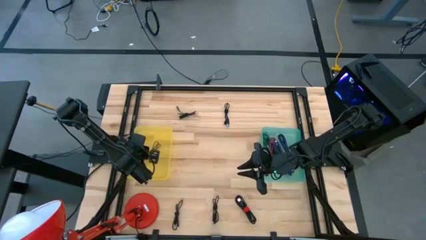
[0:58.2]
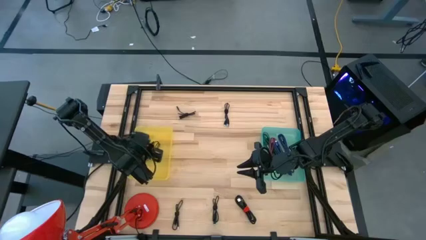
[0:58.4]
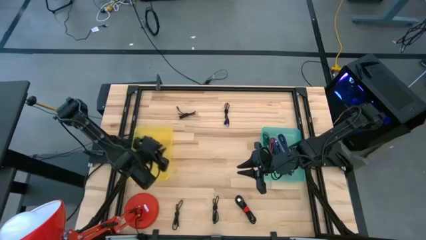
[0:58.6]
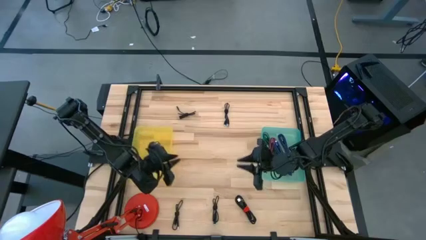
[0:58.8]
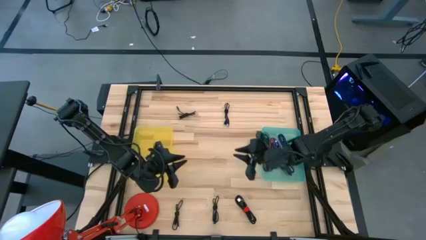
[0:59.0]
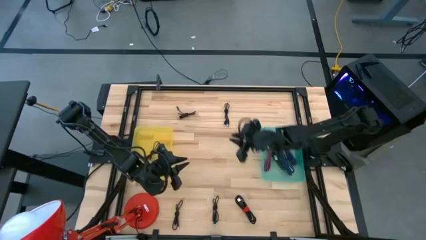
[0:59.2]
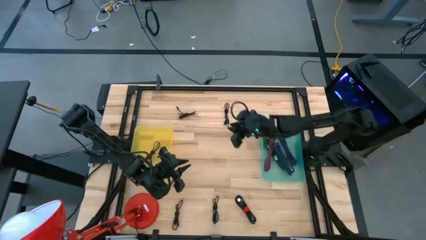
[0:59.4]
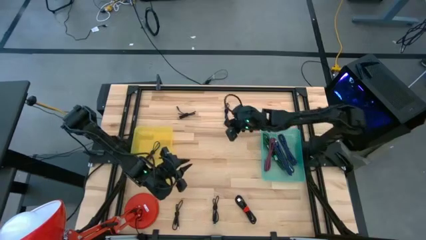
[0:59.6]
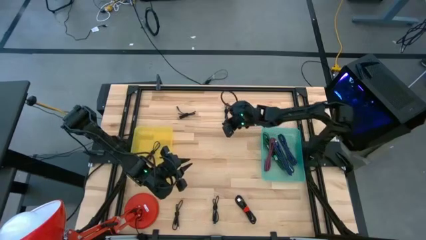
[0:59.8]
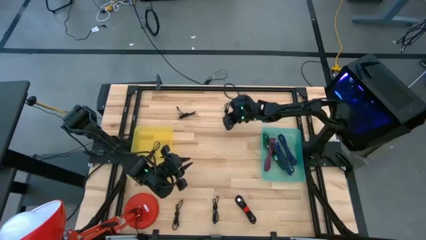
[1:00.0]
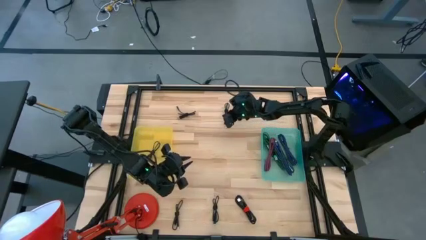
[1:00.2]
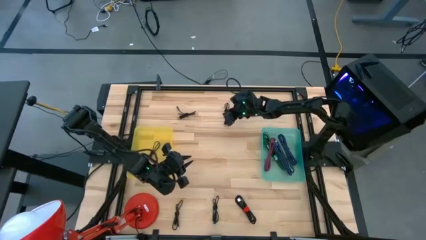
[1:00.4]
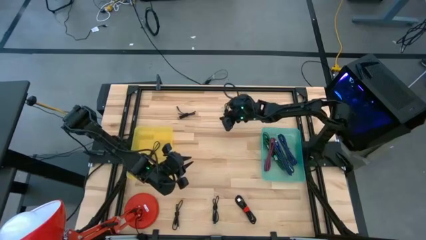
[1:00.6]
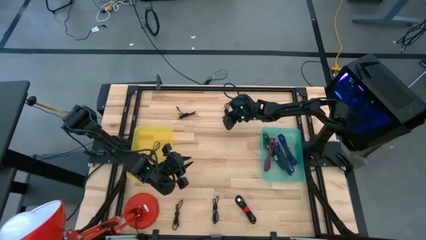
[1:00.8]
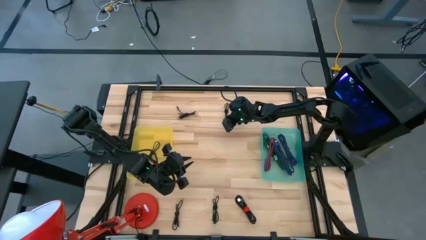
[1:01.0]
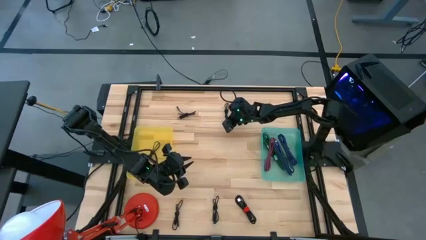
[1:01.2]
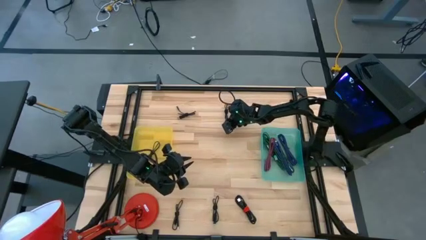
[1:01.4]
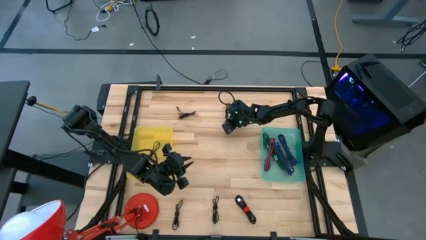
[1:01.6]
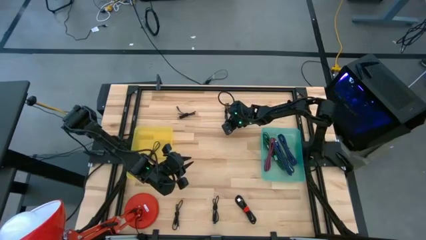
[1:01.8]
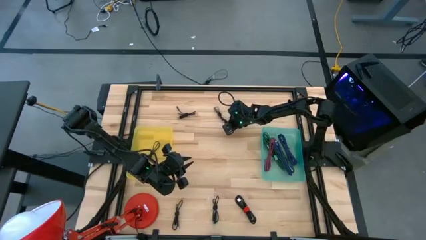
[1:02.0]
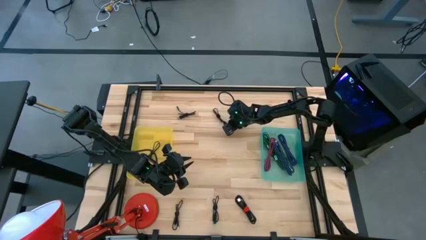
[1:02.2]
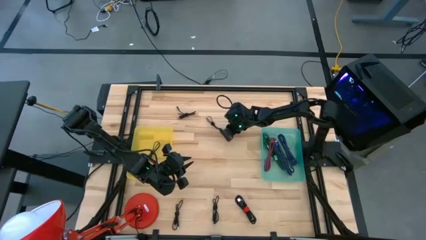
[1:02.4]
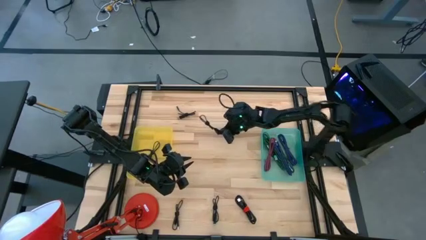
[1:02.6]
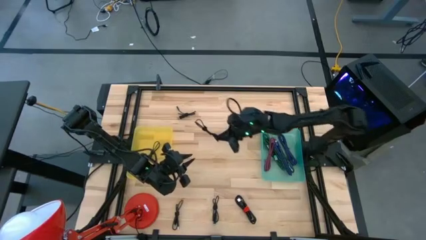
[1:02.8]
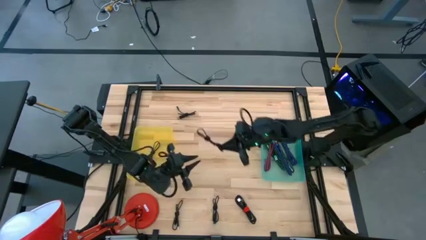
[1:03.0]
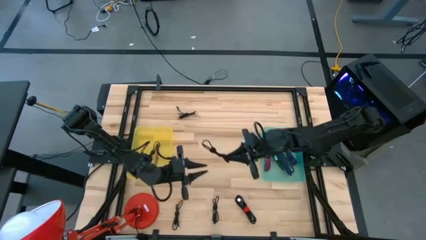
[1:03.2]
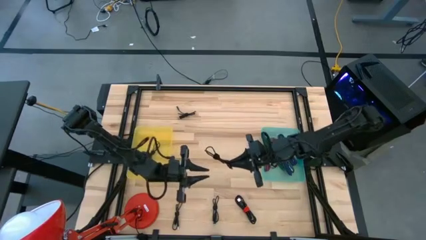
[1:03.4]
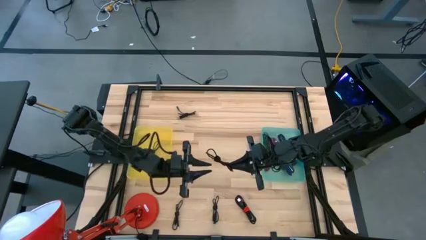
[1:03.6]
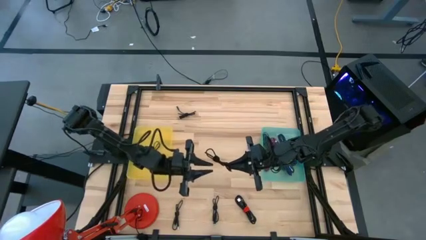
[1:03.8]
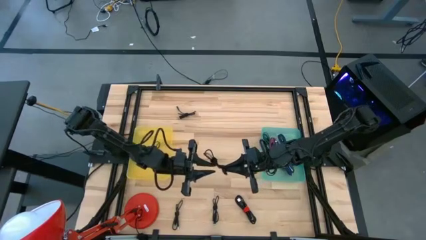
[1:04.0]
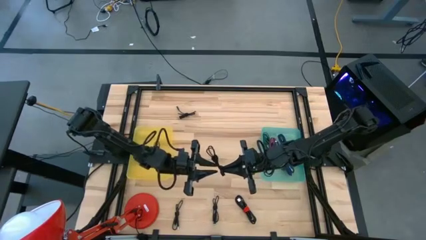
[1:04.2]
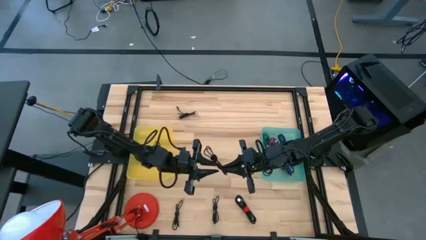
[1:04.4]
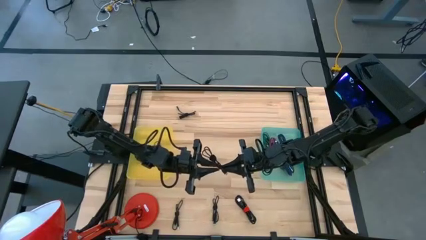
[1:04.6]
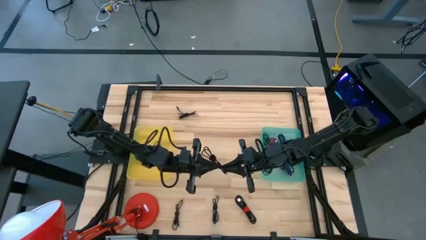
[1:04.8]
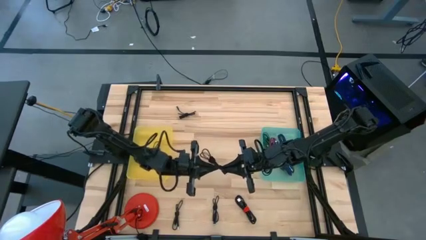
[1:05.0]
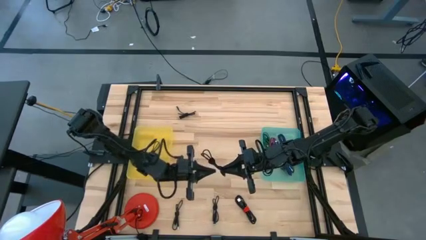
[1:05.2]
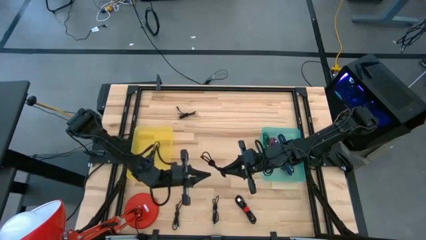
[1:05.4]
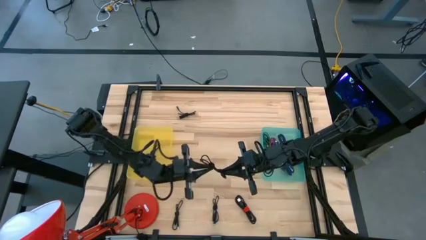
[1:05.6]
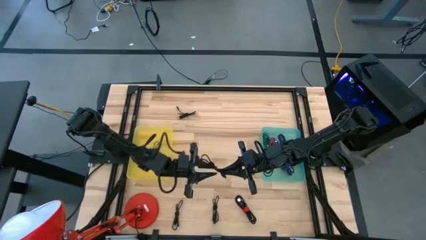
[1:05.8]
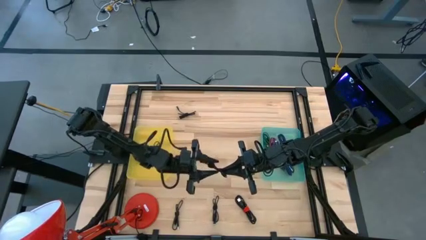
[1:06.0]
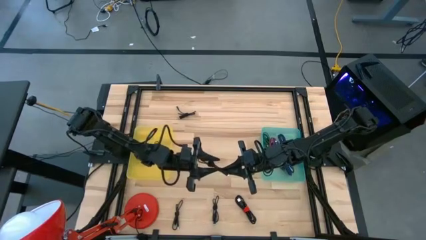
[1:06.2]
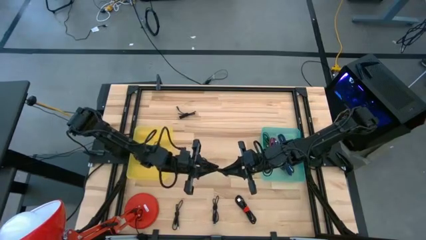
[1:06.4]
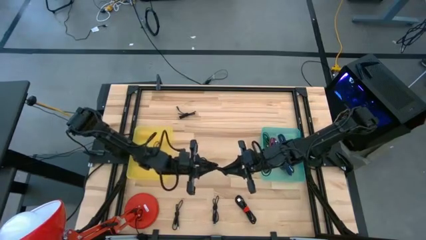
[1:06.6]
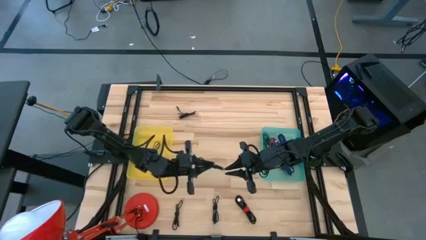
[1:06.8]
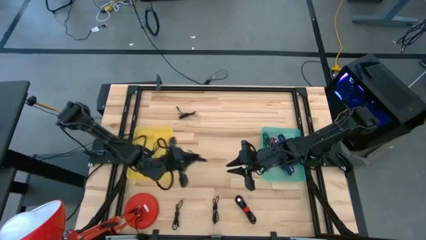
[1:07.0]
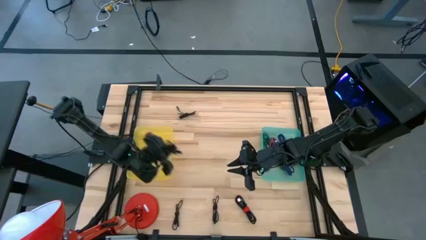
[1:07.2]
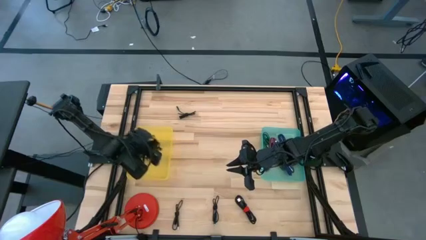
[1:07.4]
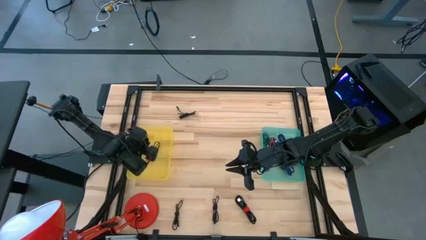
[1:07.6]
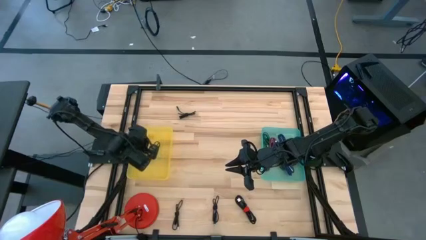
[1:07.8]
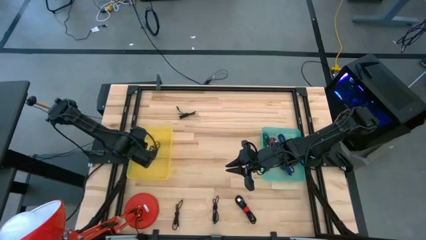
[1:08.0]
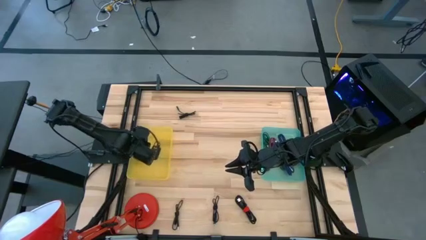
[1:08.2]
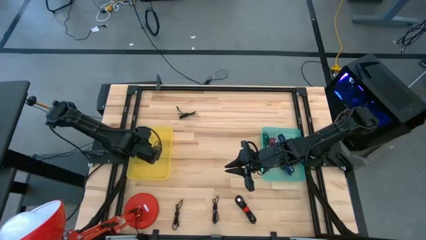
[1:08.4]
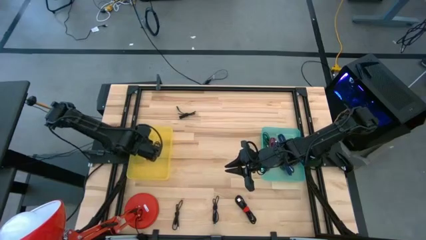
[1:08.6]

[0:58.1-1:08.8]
Task: Pick & Place USB Port
Put the black charger cable into the yellow bin

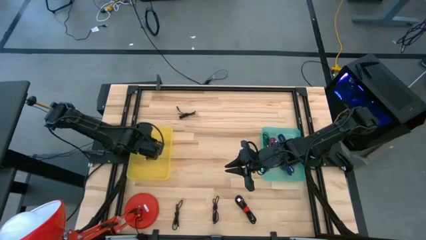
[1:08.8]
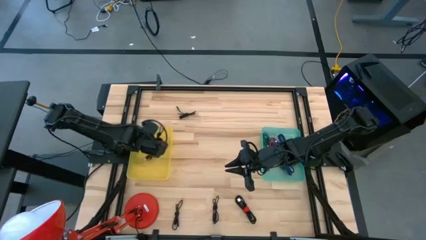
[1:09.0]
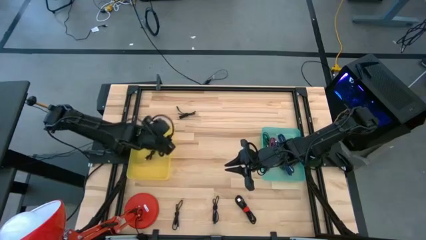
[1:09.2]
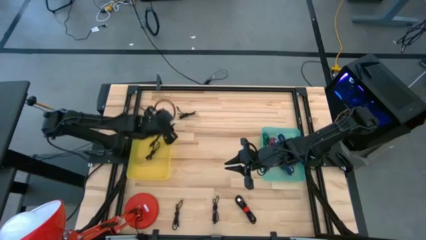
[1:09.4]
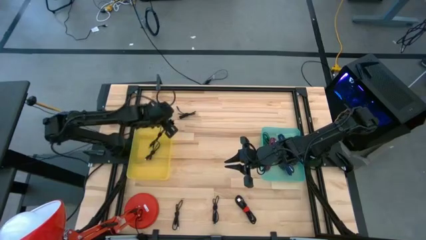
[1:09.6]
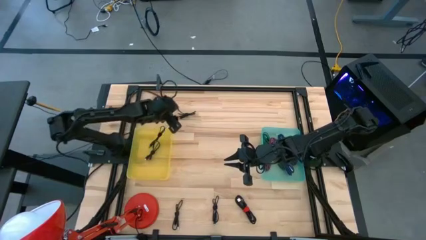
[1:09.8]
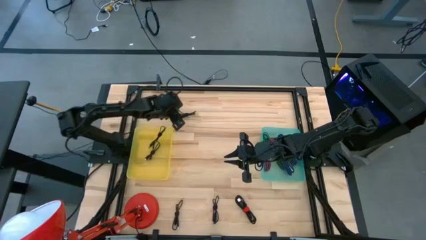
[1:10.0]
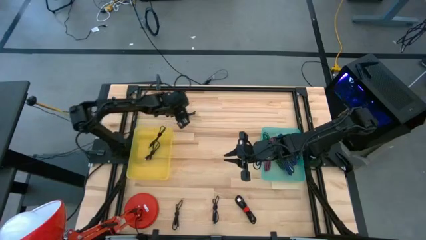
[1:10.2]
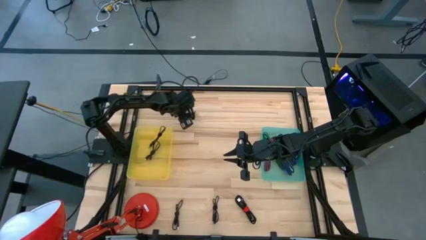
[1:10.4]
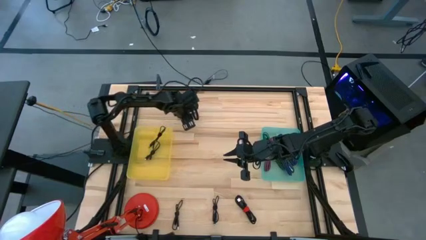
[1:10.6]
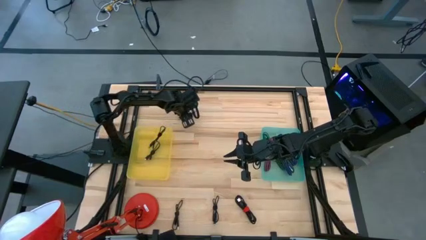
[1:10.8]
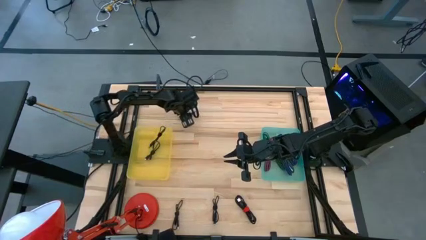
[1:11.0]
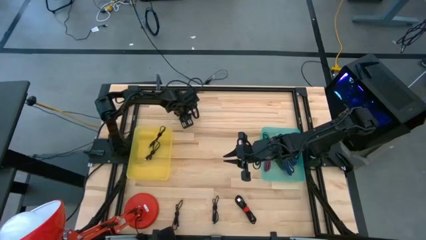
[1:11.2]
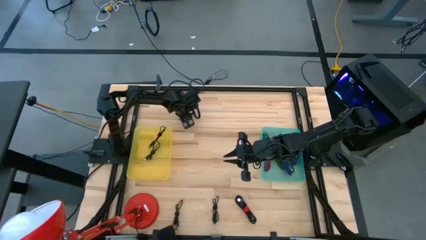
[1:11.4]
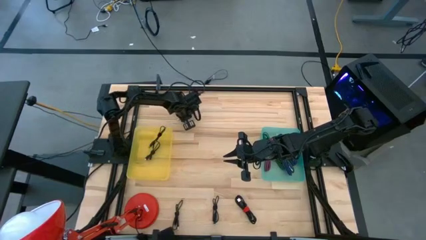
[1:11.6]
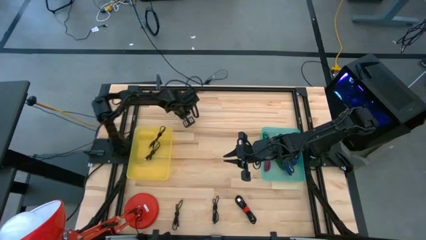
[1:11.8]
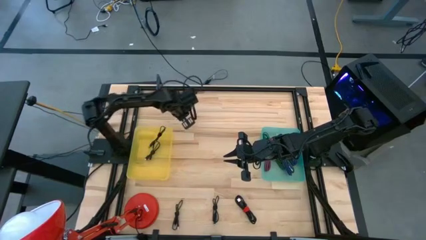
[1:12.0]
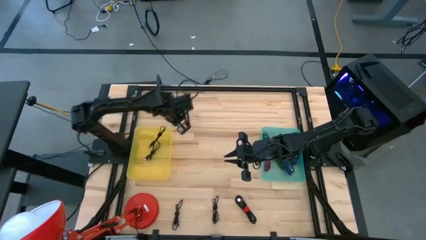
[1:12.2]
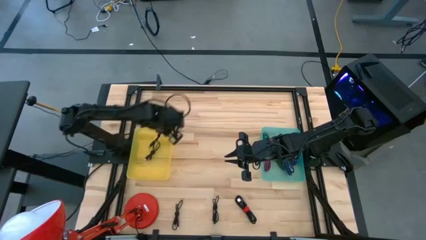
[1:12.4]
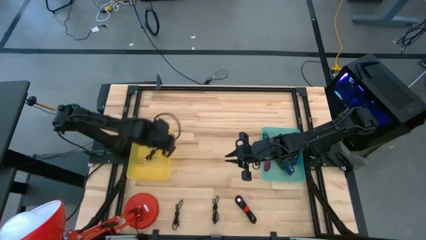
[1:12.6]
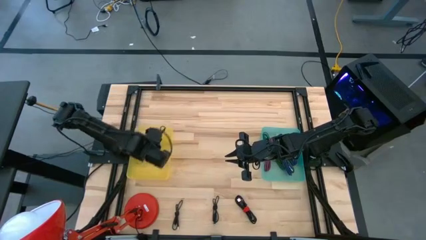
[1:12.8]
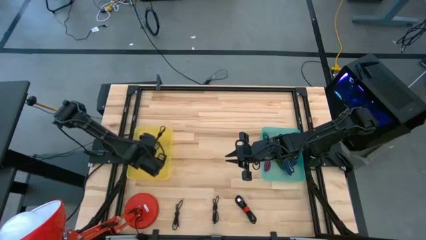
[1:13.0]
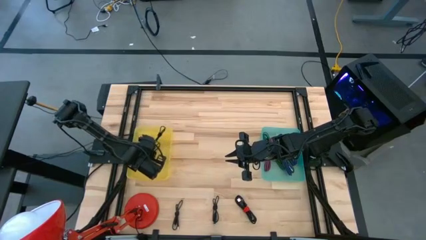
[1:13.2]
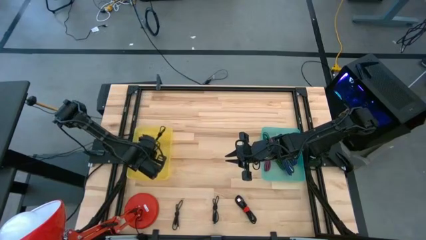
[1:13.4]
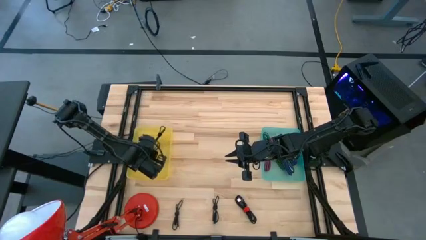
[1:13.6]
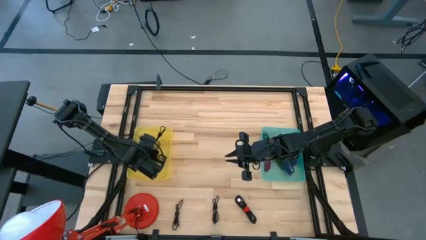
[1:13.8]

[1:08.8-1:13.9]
Put the black charger cable into the yellow bin
